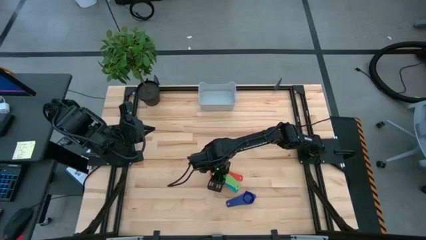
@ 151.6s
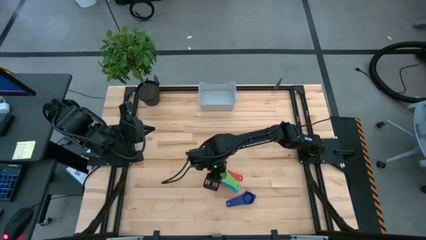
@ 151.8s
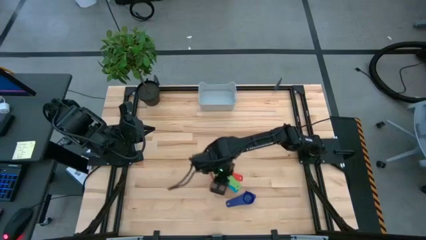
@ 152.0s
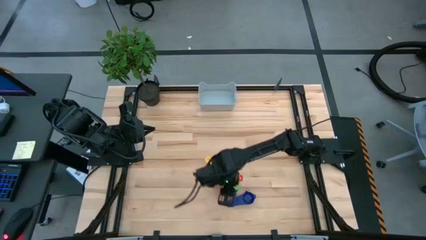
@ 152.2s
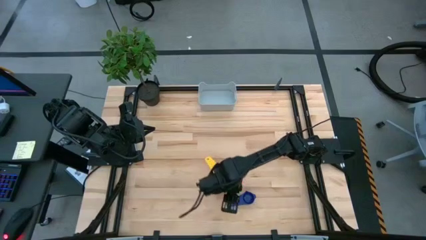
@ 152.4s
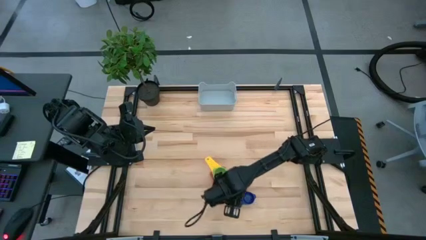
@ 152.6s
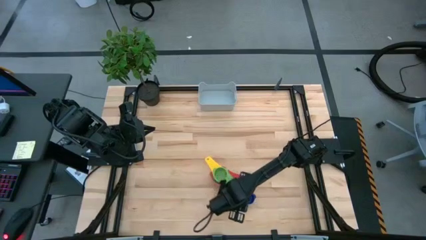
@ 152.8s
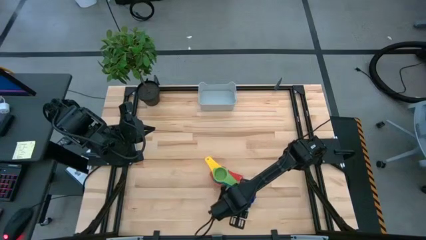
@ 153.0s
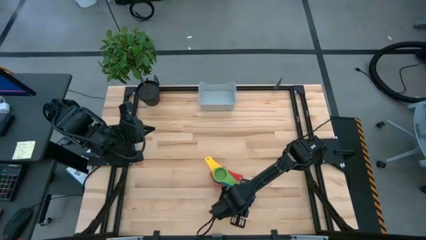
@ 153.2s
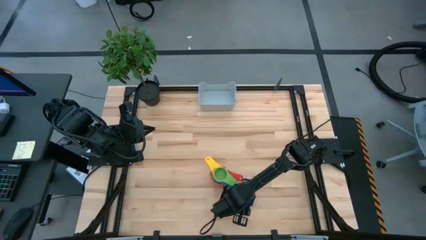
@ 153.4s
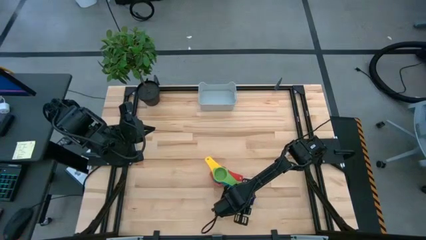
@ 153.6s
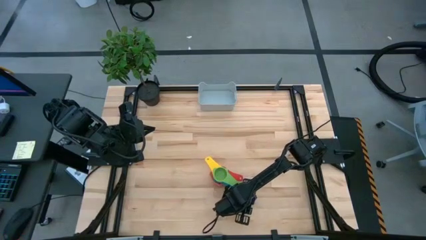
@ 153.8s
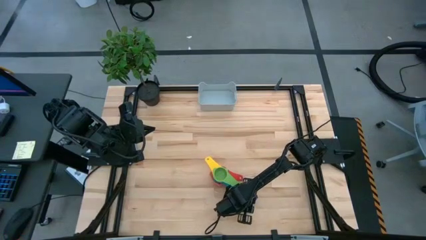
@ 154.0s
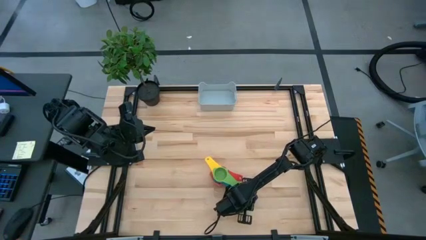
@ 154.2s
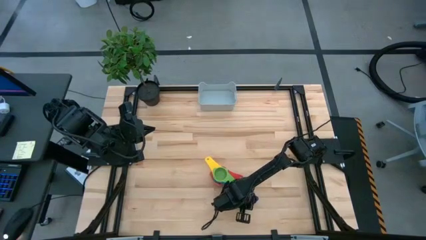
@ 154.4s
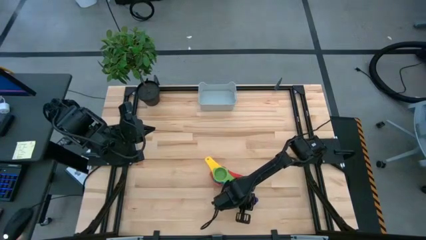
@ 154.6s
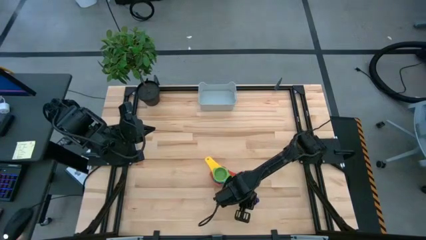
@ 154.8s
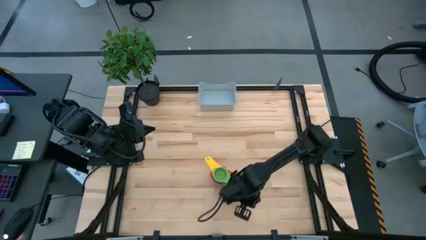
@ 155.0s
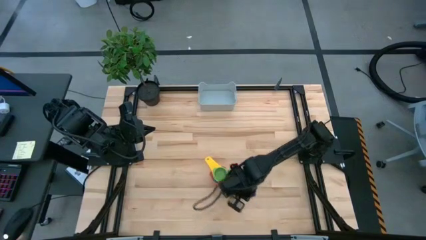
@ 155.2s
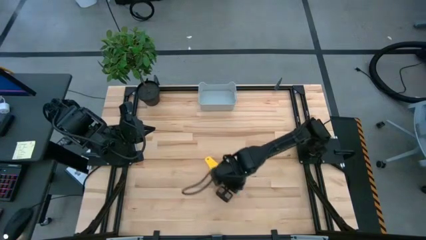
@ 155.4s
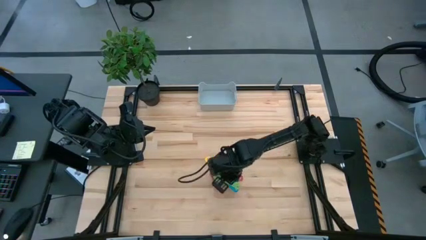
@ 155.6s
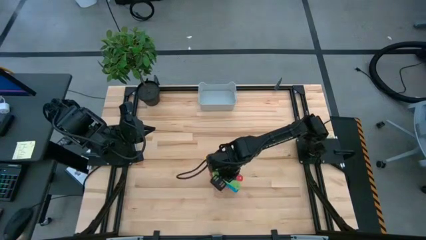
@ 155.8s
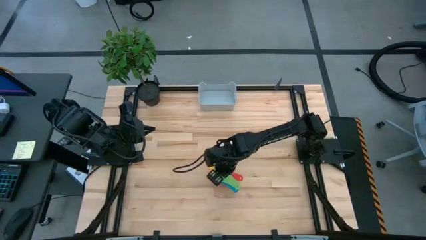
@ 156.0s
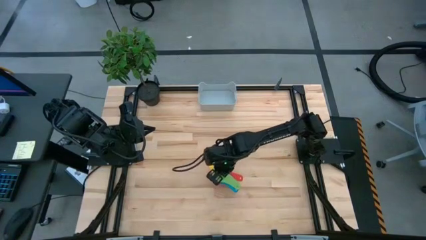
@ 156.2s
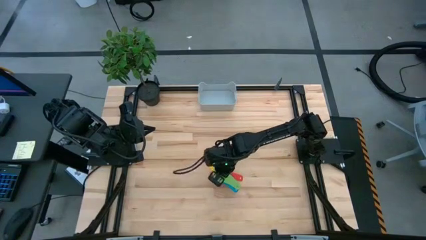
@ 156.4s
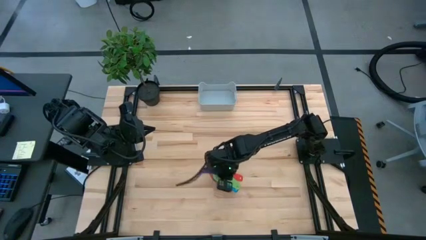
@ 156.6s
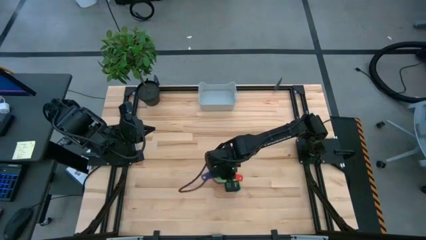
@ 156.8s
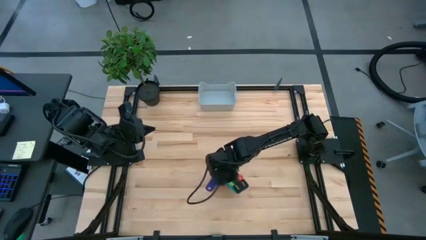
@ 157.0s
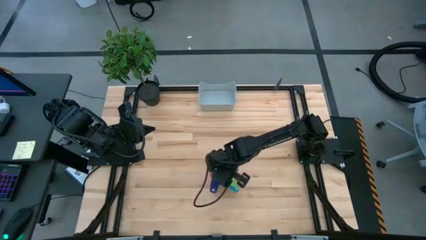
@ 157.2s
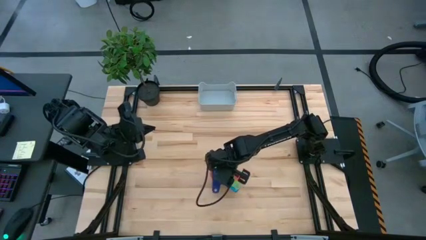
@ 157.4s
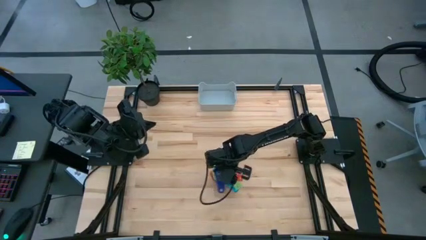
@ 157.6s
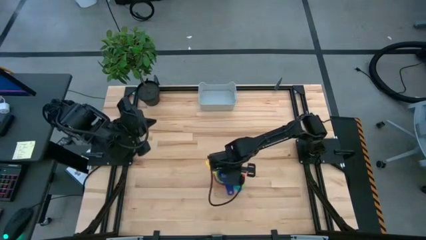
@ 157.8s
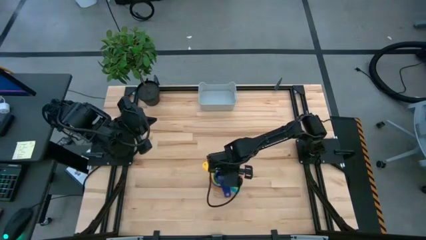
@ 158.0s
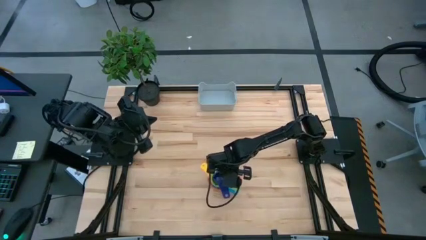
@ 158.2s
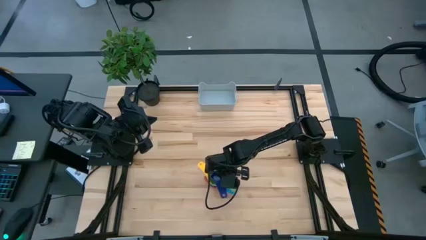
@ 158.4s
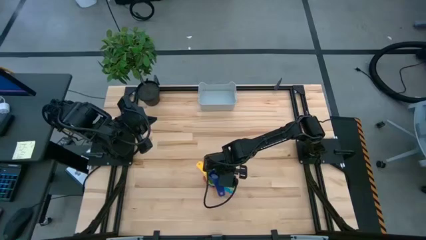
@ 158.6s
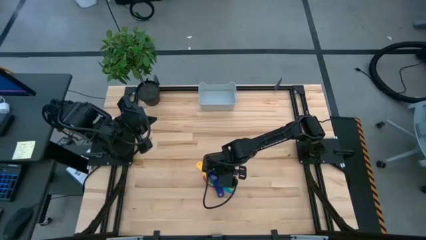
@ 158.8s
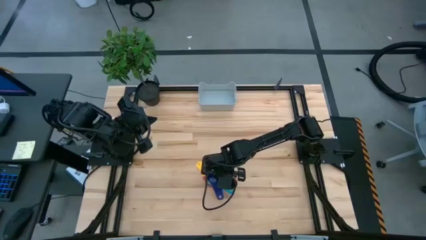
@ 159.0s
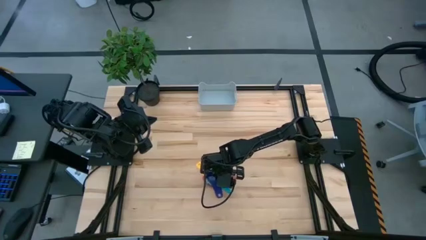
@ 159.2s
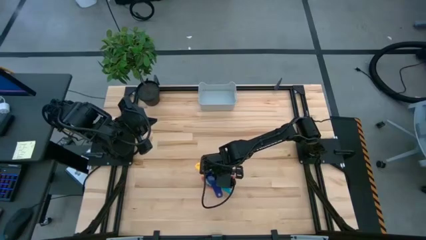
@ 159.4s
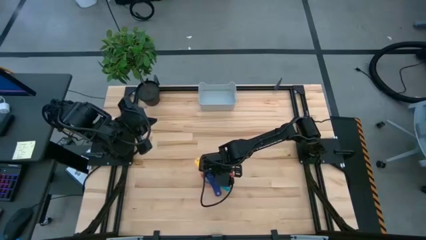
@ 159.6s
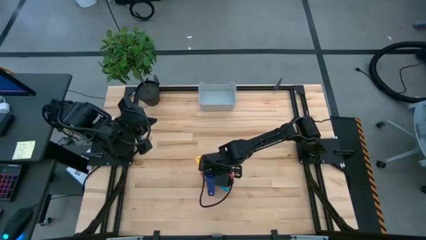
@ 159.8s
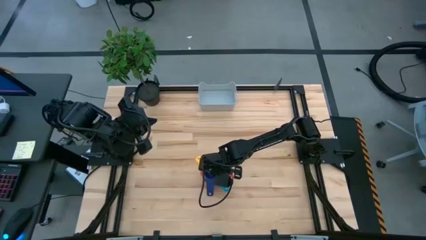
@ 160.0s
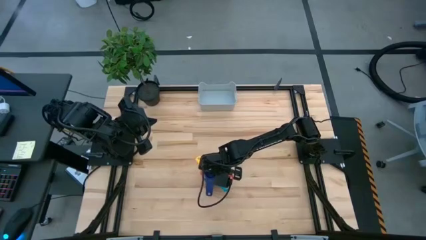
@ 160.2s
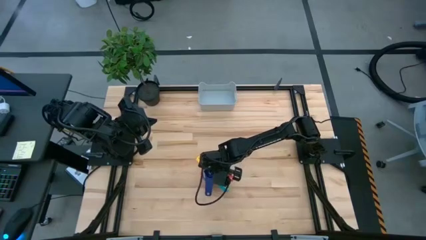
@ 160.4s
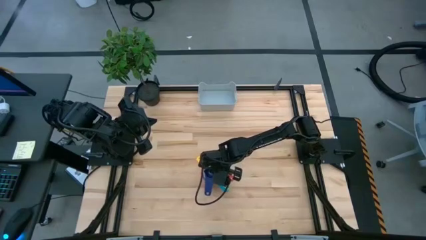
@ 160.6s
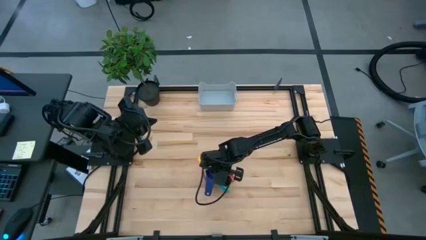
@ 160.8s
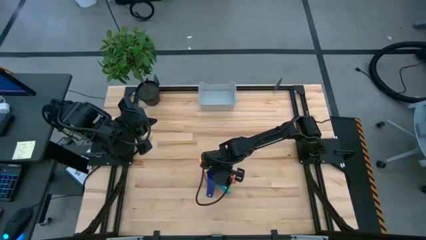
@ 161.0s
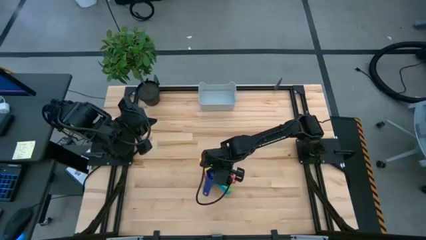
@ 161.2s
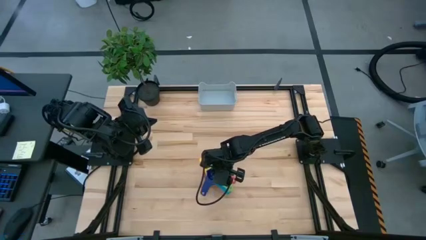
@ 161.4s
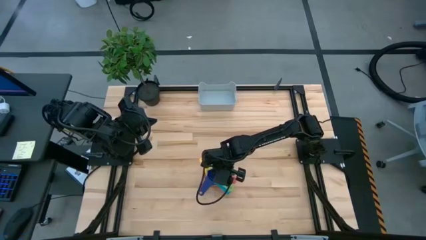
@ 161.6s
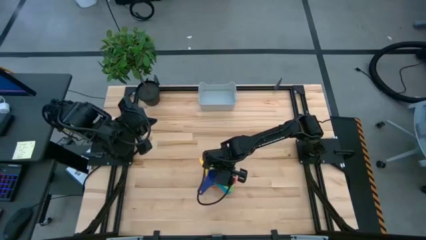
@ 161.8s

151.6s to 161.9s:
Task: Nest measuring cups in basket
Stack the dark blue measuring cup on top of the green measuring cup

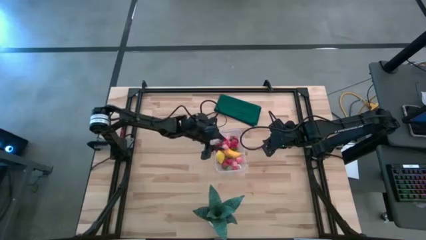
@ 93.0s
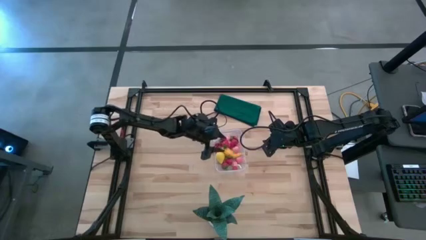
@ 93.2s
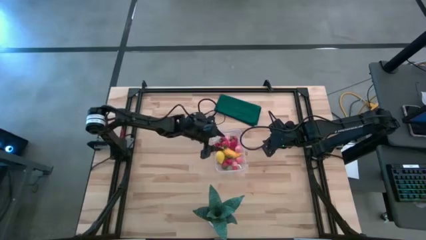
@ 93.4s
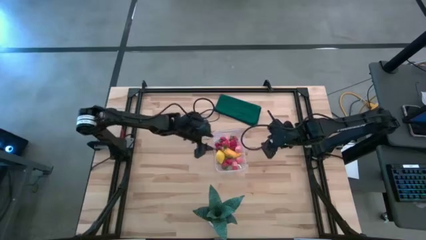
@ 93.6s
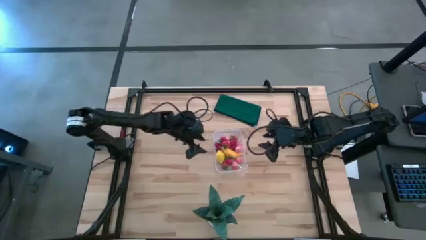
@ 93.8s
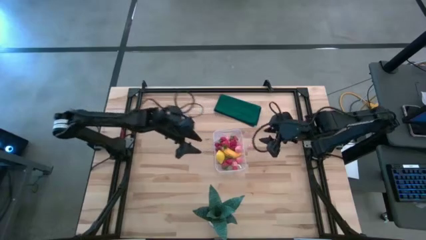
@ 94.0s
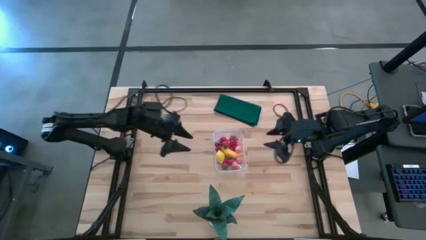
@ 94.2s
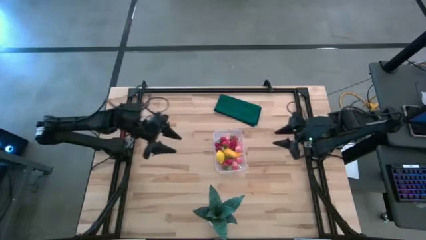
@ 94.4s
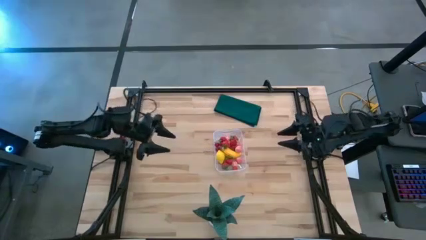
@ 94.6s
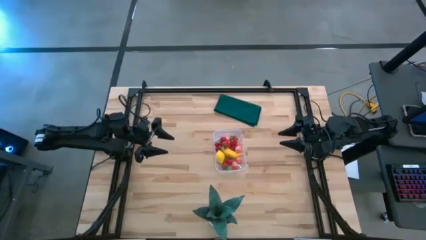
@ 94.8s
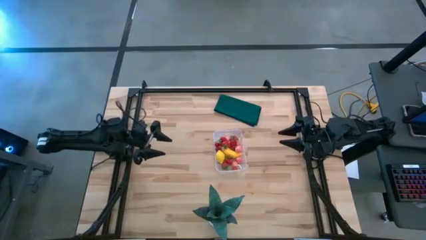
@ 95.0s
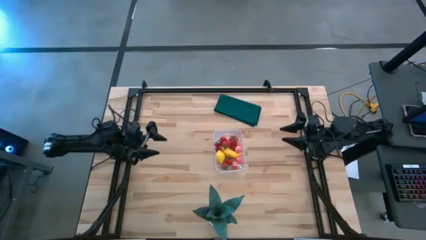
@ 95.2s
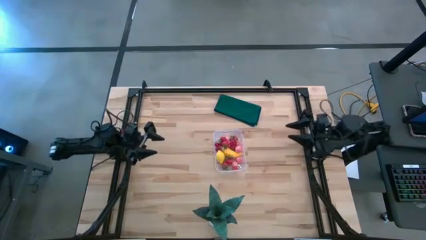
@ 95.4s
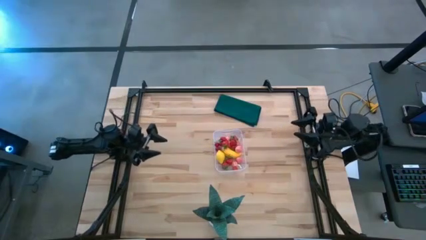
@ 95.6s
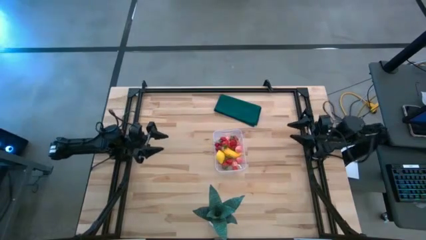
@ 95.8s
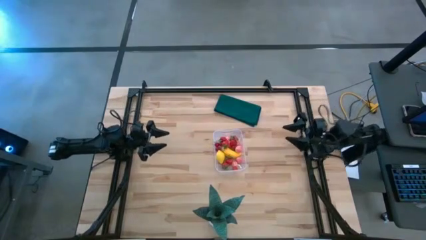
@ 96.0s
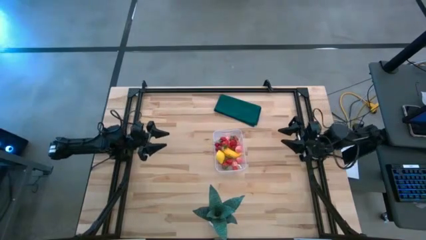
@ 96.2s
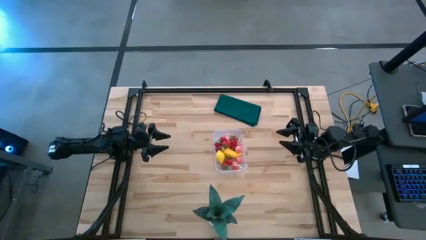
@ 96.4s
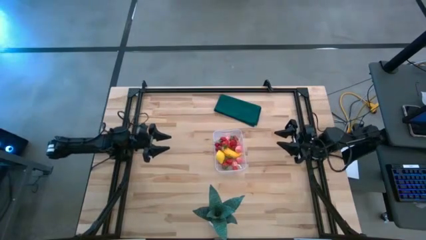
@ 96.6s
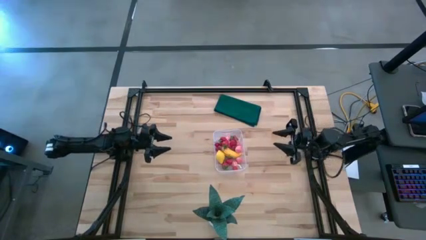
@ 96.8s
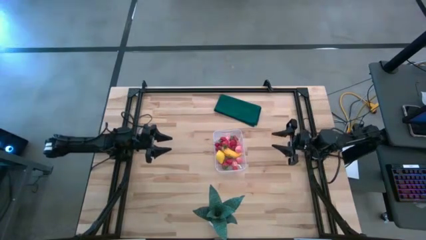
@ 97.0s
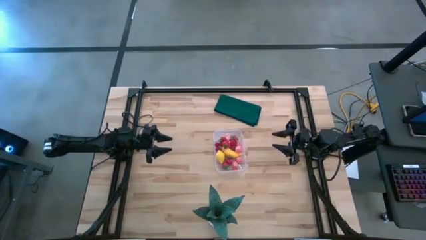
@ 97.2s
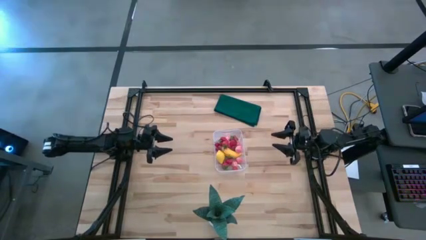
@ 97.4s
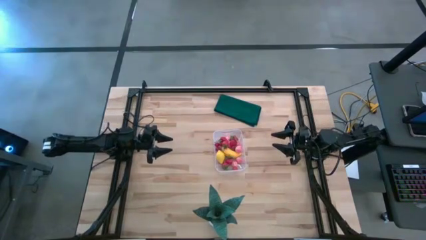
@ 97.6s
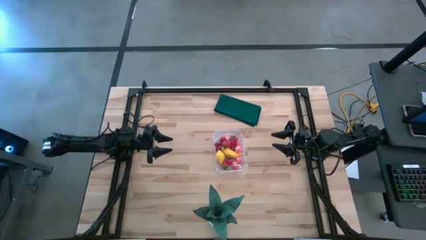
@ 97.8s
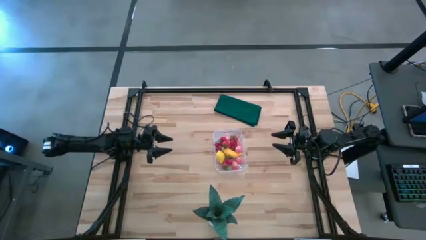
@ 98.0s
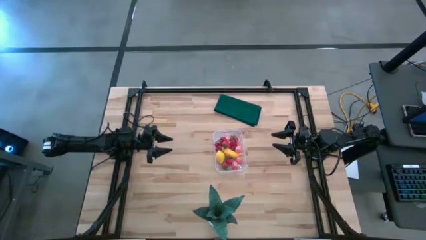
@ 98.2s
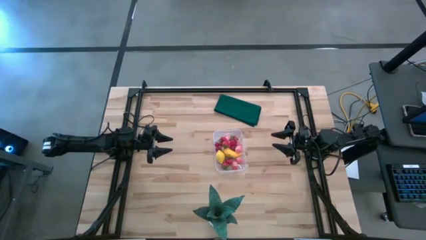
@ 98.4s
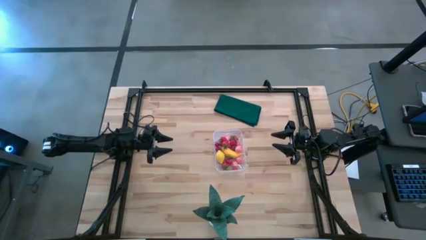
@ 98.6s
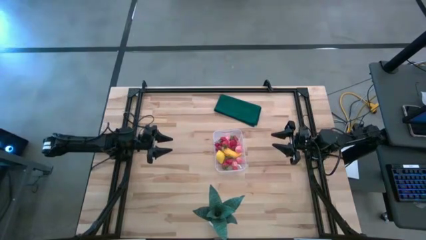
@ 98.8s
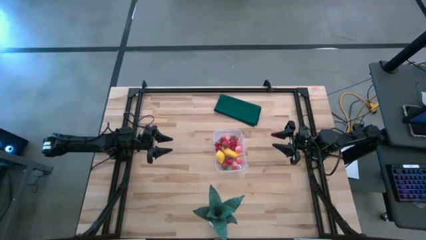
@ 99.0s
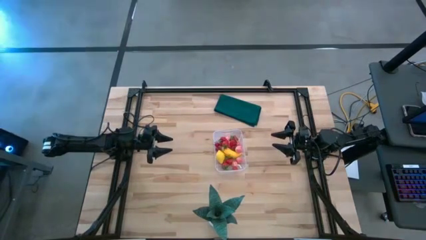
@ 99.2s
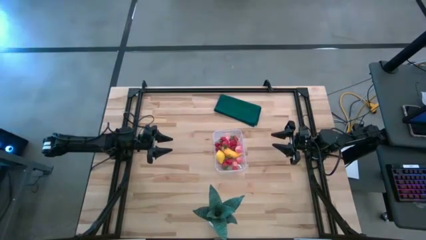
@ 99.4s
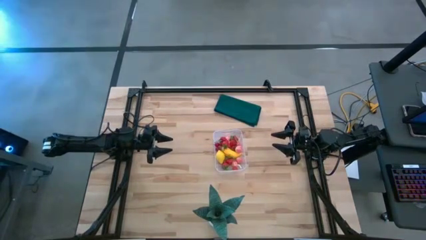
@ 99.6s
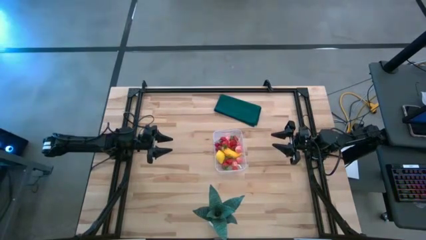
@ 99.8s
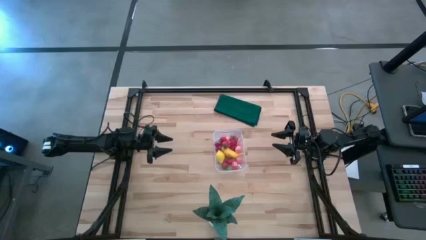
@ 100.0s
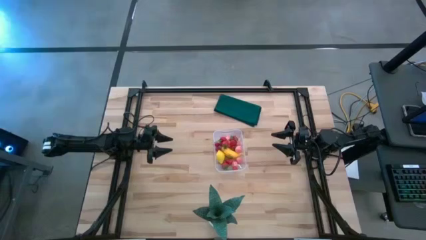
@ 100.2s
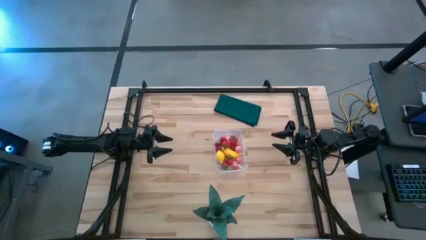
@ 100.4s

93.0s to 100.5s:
Task: Pick and placing Produce into tupperware
Return to Home Position
